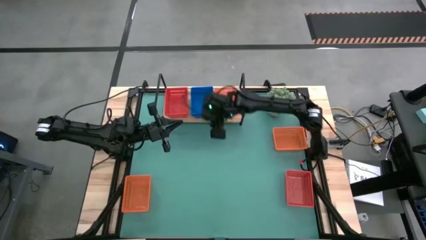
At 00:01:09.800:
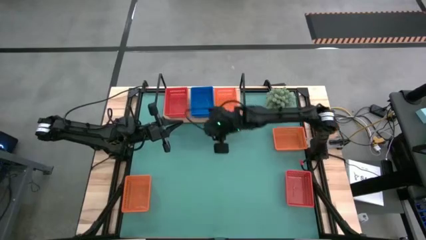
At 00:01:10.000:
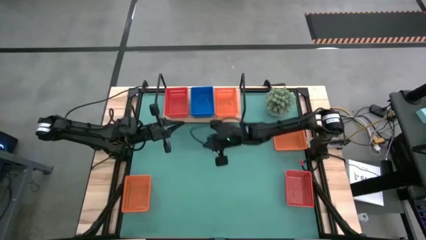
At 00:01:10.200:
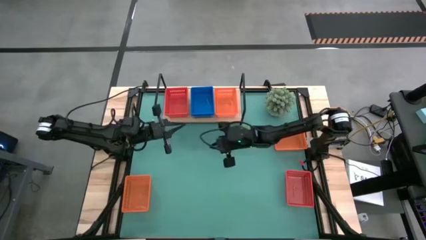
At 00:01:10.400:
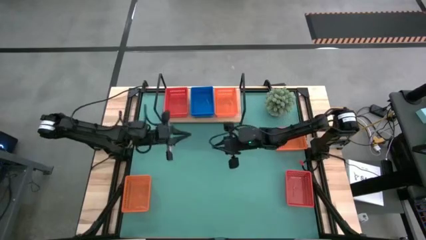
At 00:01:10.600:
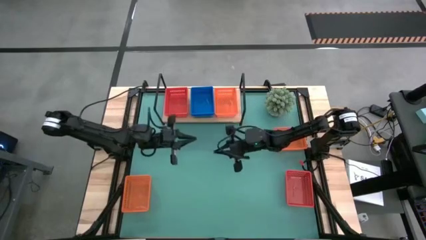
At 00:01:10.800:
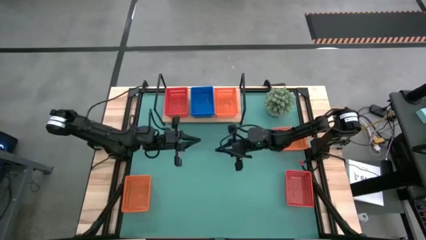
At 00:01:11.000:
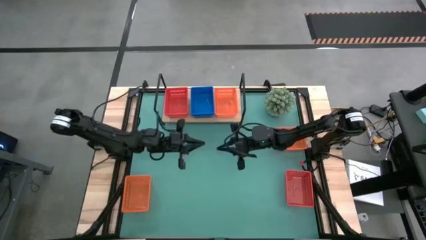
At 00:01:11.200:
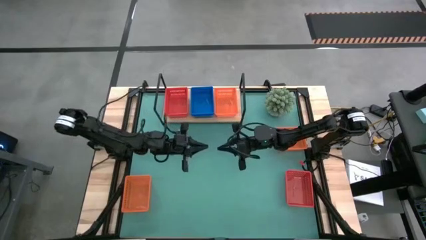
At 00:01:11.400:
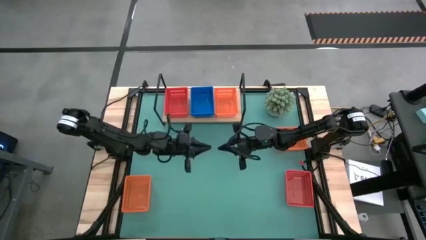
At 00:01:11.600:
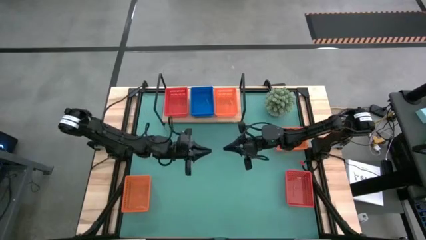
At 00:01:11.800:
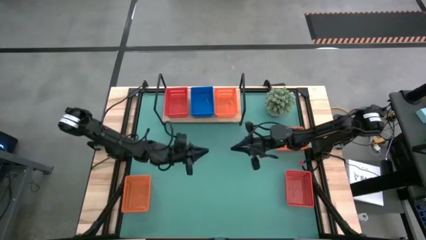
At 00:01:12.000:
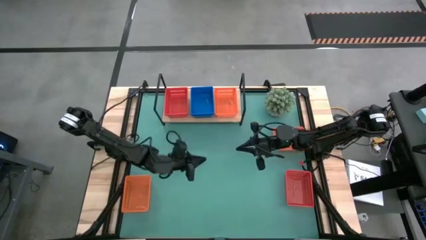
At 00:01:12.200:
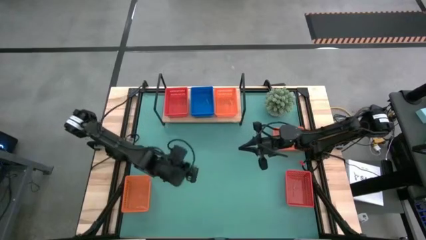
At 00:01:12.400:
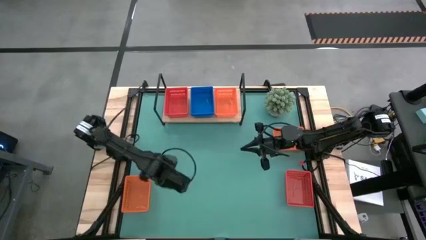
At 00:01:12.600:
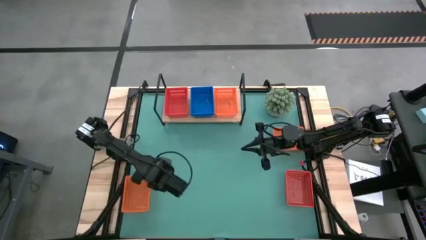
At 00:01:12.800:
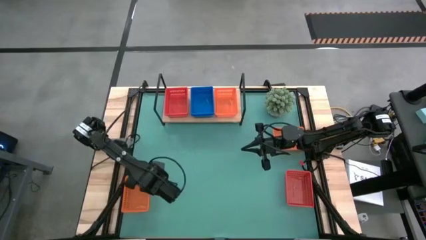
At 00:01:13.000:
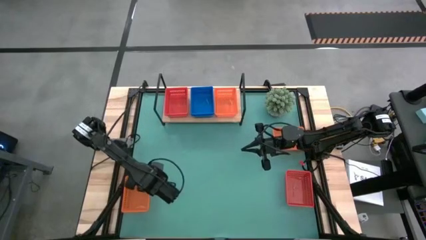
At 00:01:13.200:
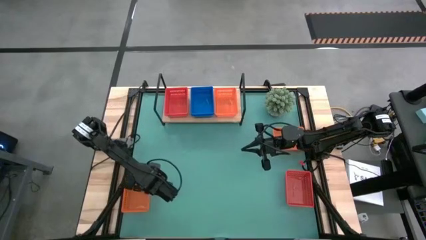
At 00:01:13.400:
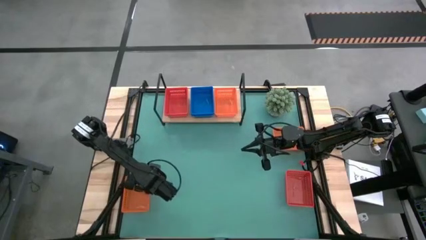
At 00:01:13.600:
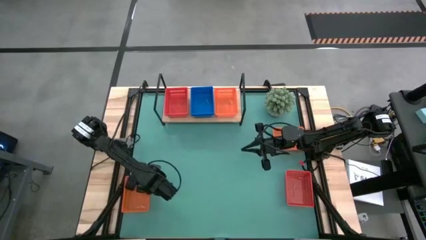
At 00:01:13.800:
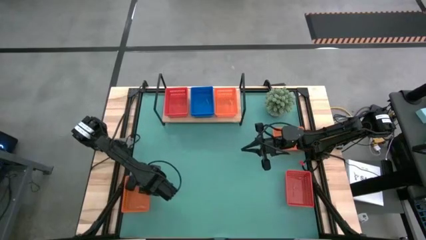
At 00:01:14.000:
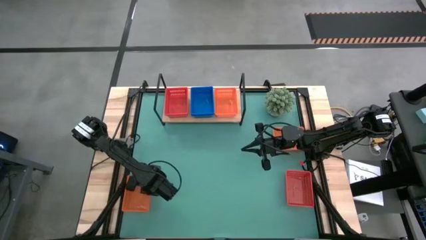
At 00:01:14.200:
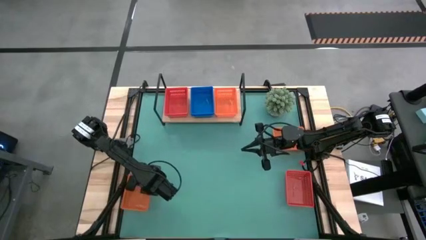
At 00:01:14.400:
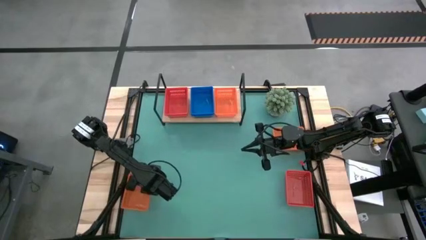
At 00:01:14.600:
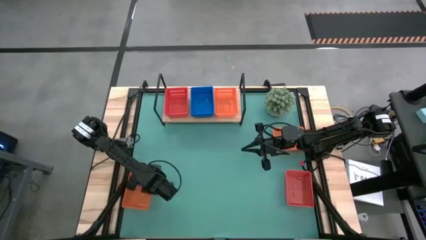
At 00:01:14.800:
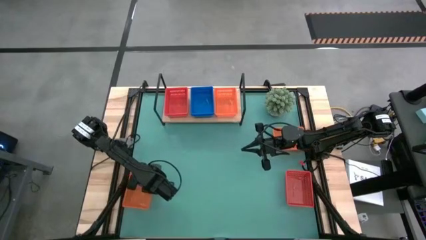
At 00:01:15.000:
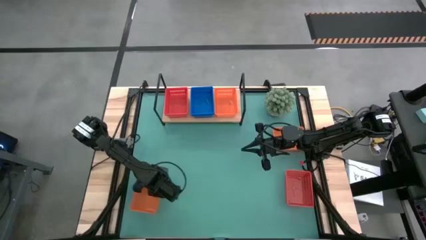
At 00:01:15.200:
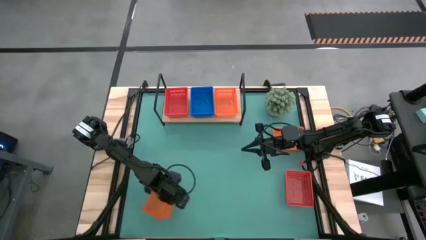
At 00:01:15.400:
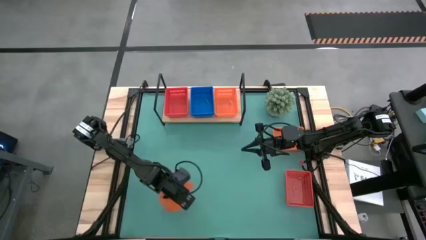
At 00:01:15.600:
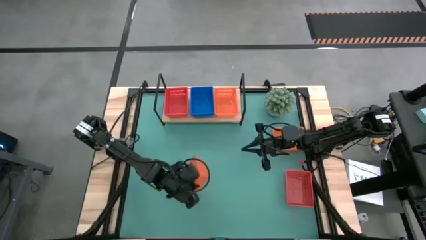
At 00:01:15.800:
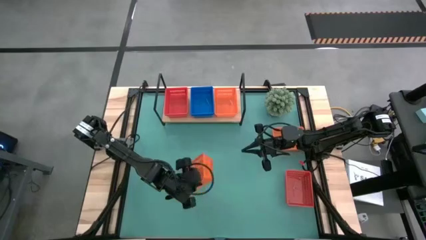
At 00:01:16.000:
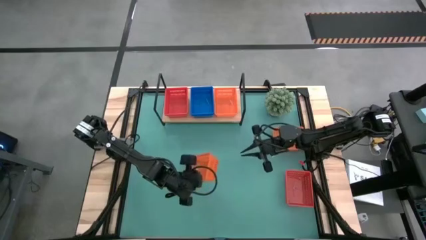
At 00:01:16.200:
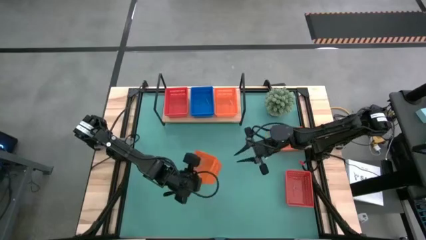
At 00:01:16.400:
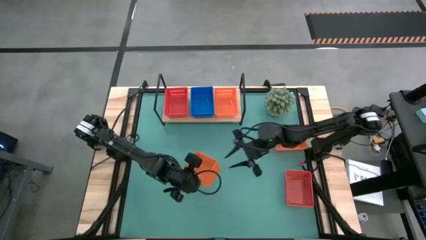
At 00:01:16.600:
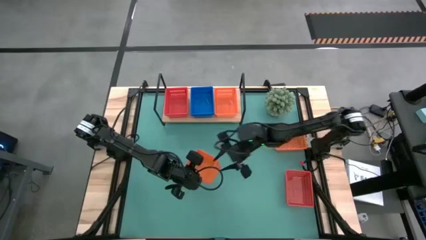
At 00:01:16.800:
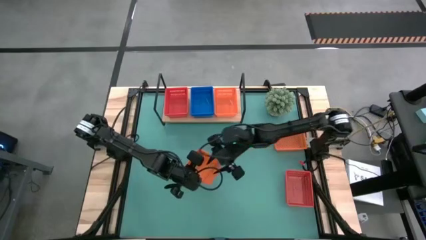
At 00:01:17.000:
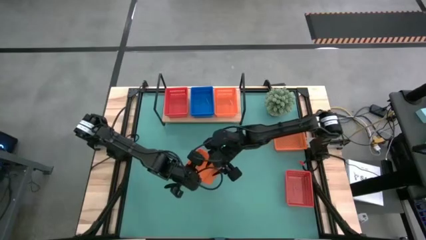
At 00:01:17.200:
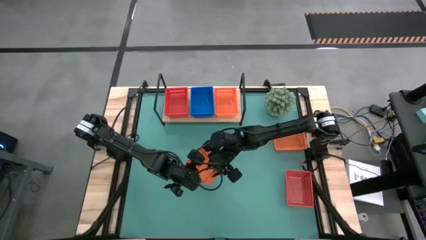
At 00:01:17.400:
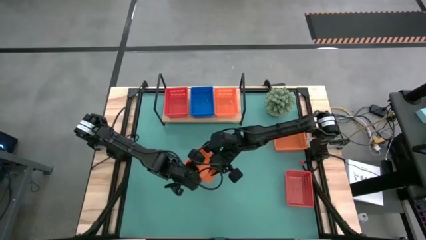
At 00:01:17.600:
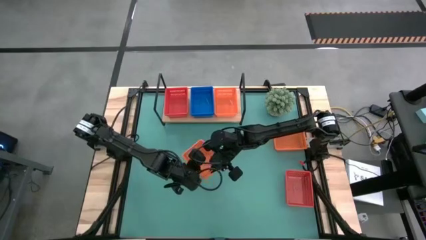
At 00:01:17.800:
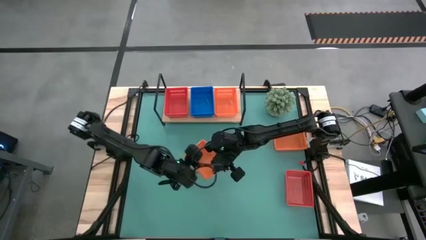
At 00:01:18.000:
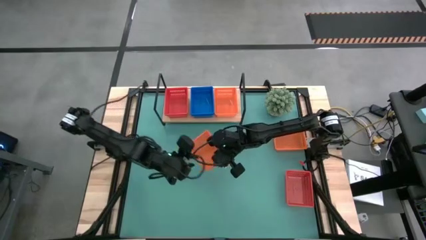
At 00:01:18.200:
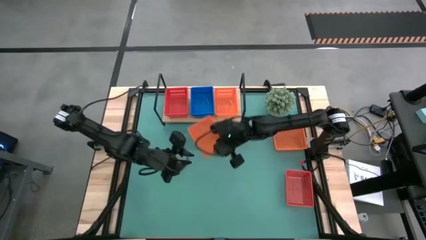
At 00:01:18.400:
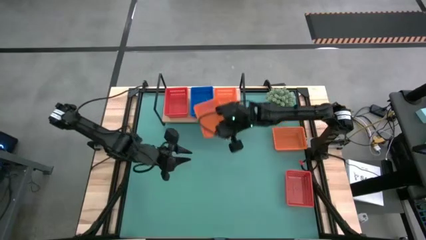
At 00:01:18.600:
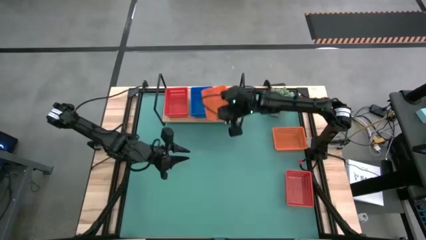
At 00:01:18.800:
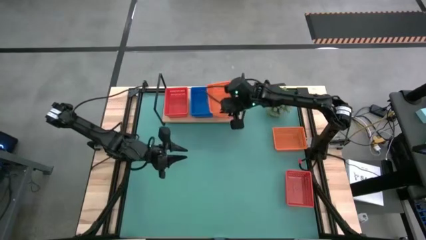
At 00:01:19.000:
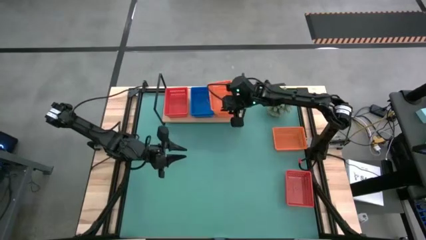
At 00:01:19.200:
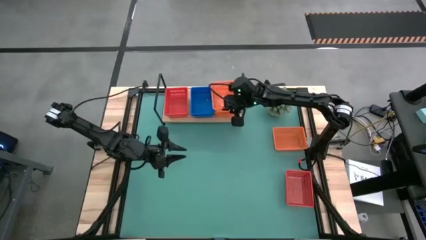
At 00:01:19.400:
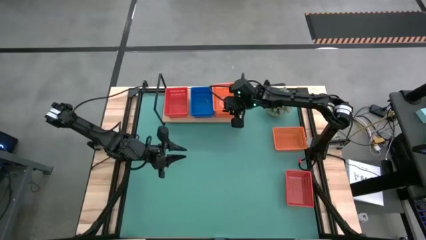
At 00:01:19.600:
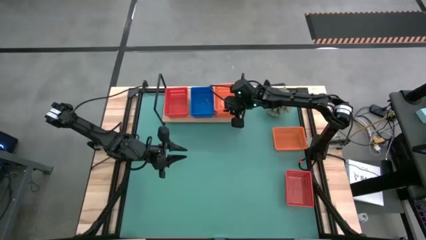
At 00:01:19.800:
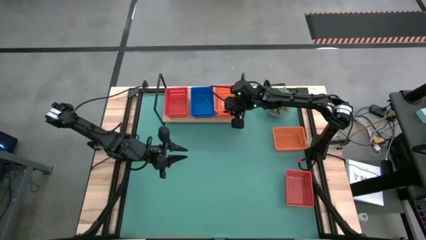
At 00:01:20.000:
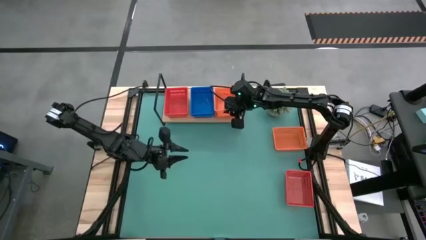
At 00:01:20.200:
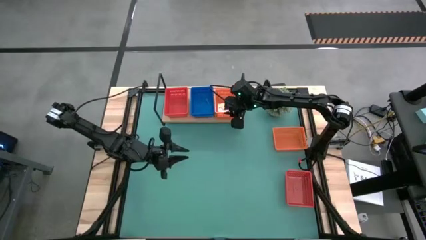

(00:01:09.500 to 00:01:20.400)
Task: Stack baskets on shelf by color
Stack the bottom orange bin on top of the orange bin on the shelf

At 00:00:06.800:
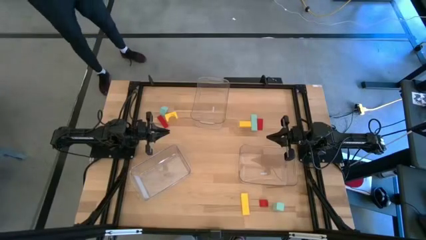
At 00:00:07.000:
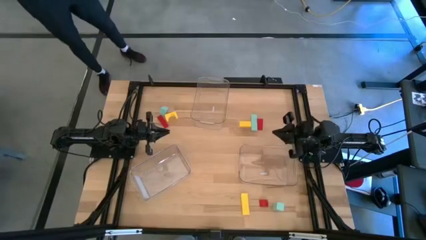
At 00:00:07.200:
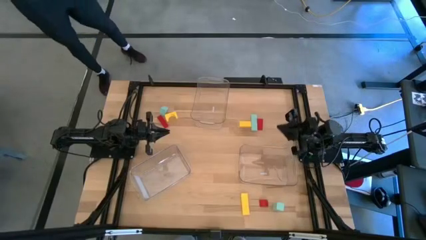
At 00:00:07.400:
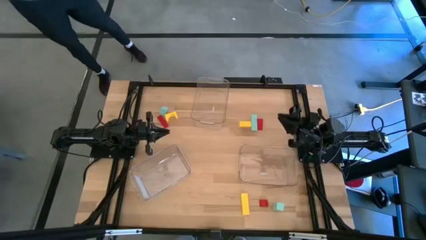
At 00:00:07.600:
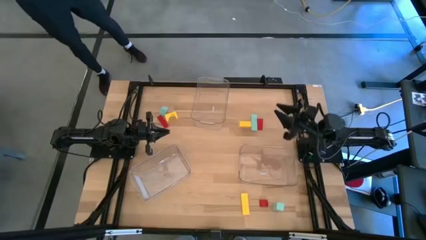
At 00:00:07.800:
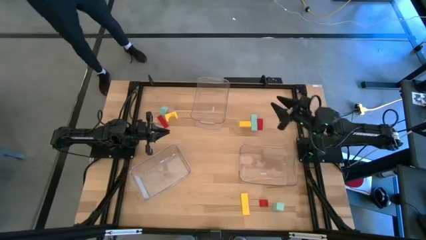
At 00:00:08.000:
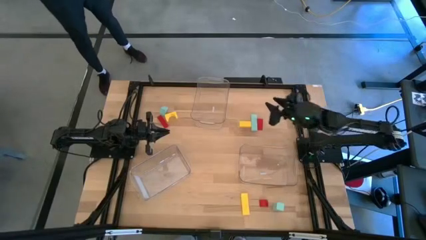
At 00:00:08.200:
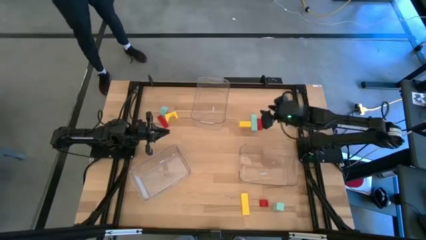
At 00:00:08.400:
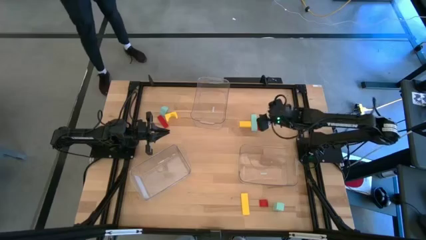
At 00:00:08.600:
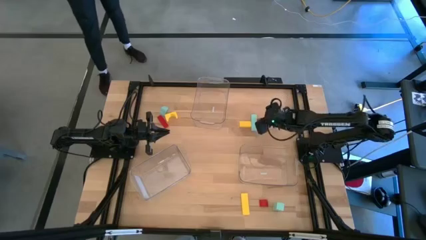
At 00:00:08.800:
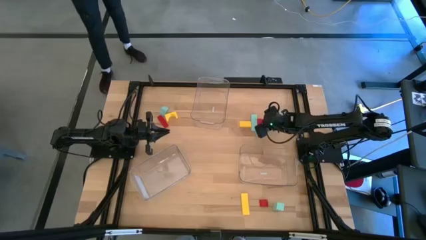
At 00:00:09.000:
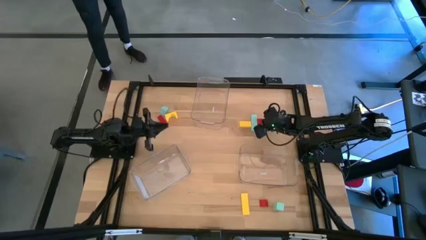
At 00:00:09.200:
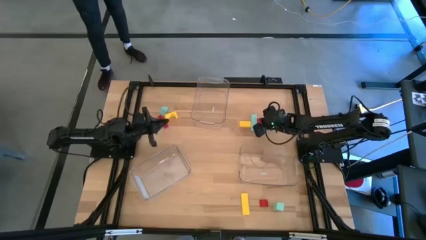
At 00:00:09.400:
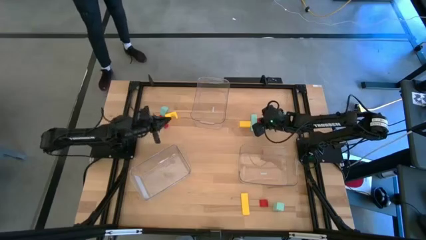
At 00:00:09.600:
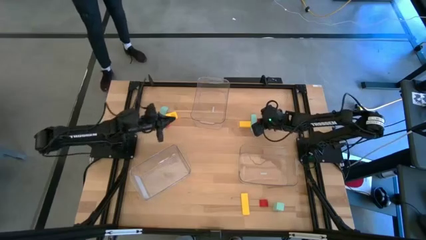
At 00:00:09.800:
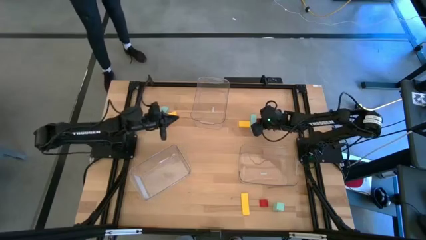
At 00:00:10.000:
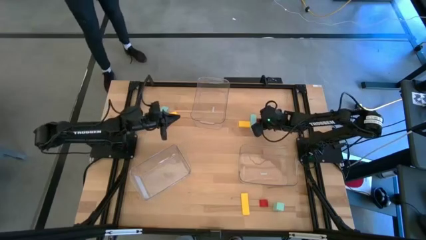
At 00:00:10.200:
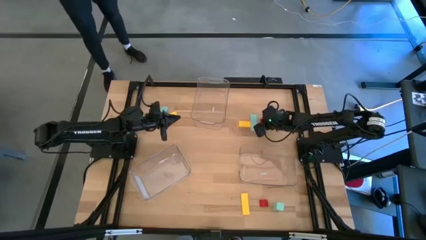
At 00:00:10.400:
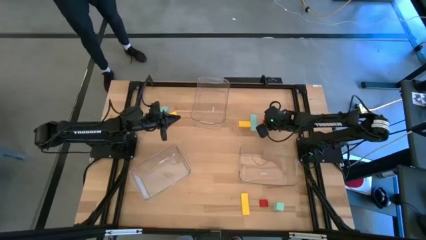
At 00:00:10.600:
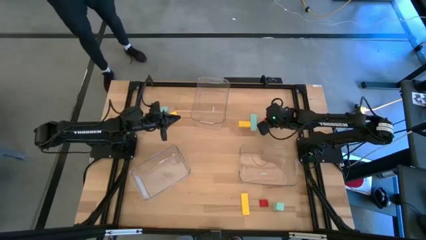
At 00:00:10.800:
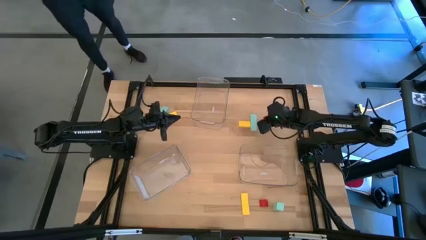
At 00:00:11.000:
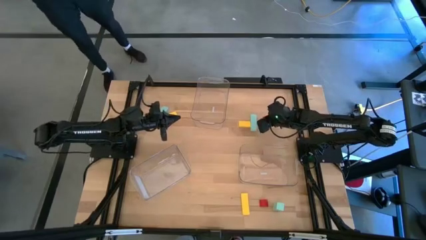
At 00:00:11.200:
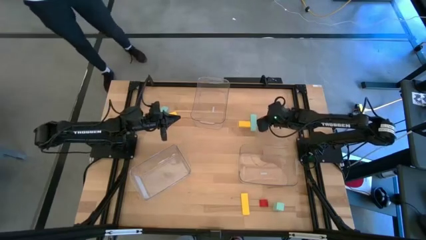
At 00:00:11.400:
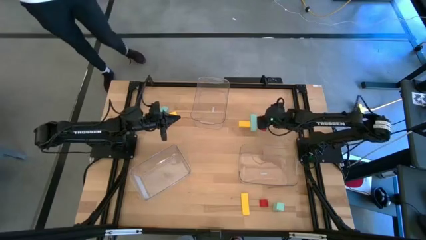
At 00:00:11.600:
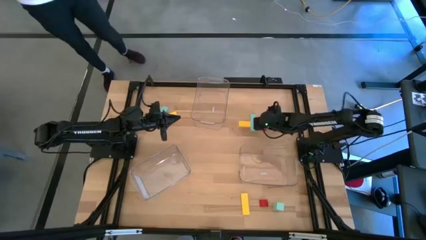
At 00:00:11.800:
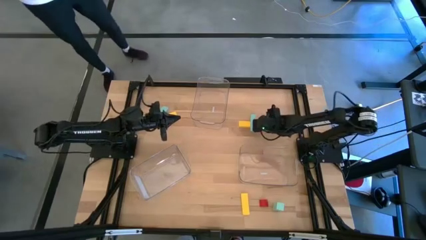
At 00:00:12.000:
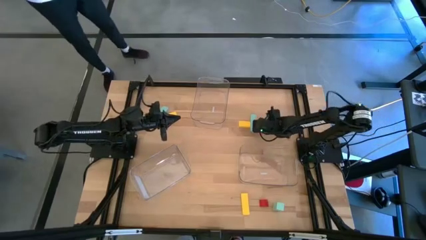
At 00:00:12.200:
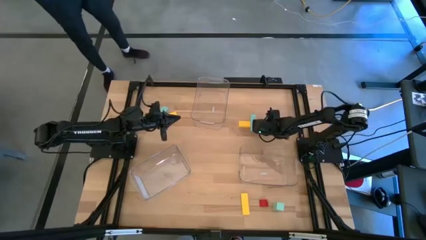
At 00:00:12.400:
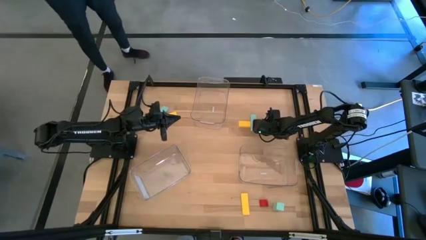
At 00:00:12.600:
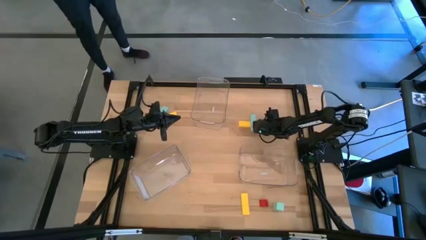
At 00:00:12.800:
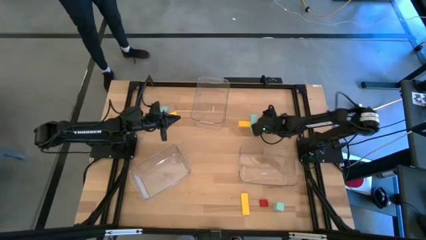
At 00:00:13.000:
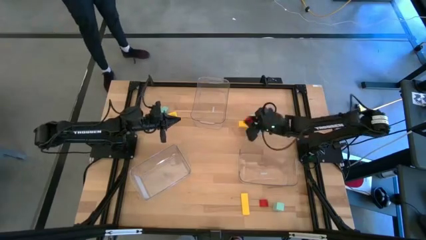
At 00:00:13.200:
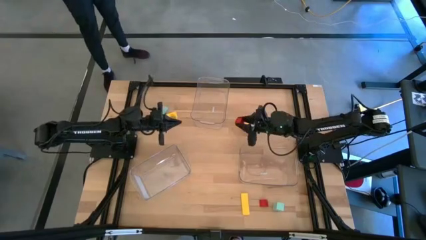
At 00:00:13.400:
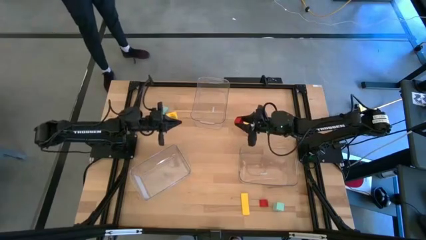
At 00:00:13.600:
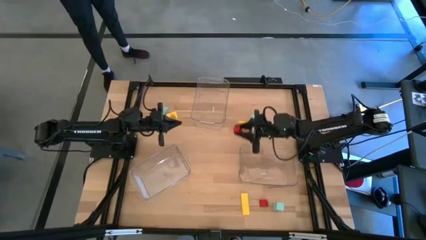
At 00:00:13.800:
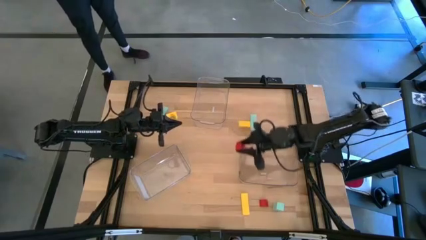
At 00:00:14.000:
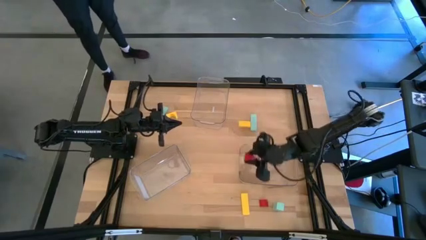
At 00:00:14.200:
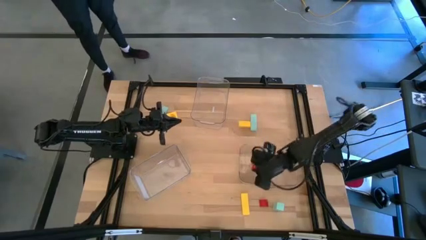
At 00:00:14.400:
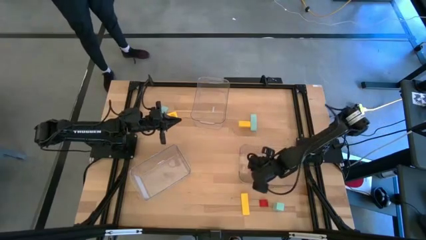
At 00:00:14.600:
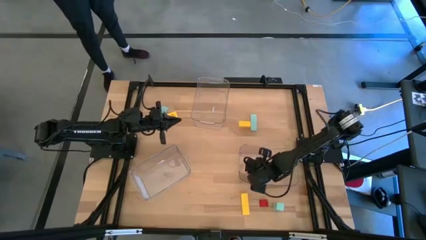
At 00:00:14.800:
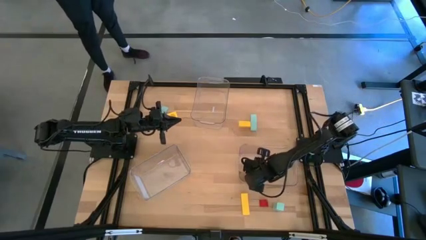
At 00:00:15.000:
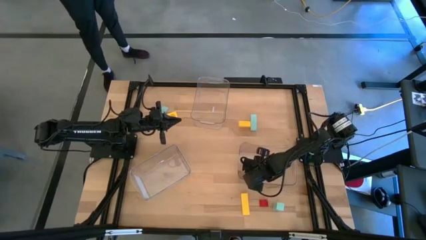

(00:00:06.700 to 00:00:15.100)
Task: Sort & place blocks by color
Put the top right red block into the bottom right transparent bin
